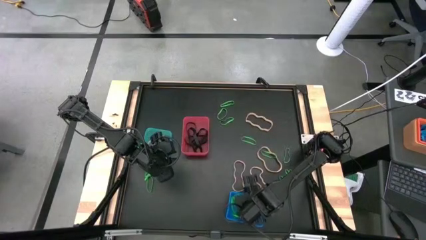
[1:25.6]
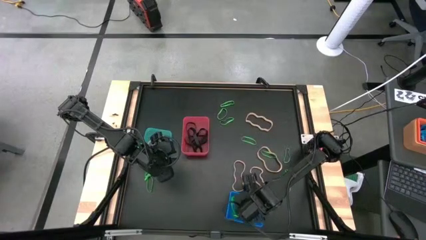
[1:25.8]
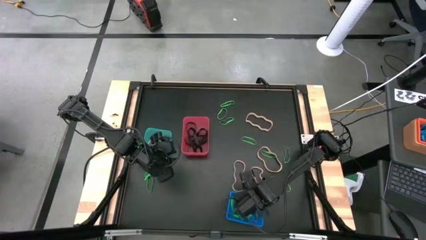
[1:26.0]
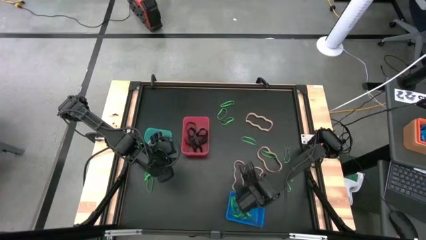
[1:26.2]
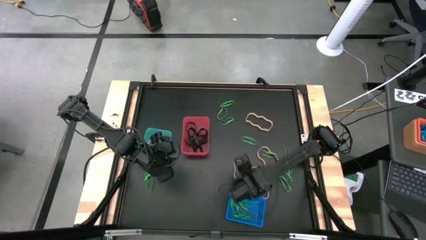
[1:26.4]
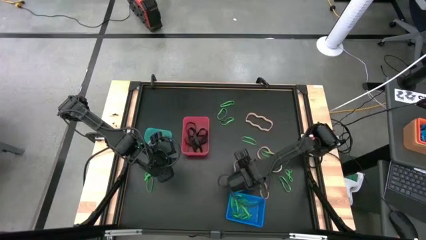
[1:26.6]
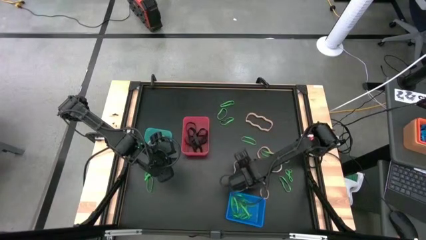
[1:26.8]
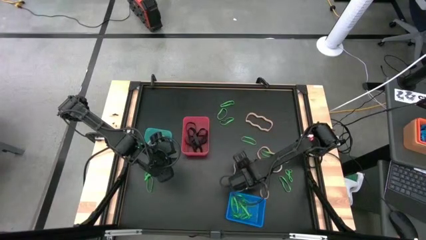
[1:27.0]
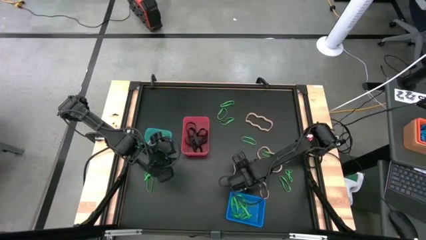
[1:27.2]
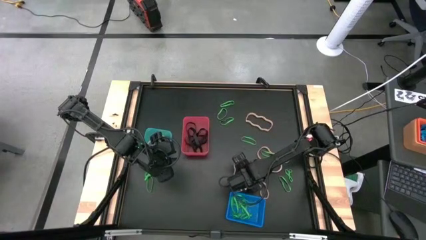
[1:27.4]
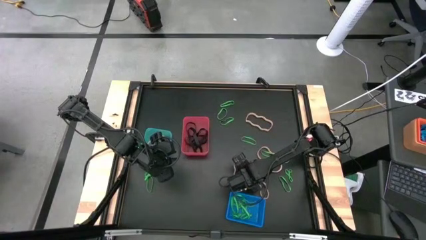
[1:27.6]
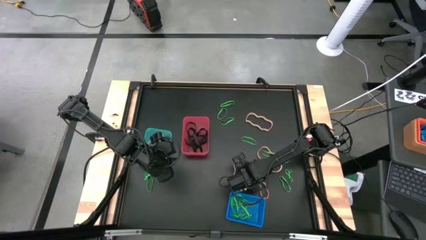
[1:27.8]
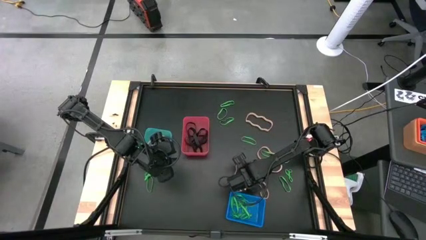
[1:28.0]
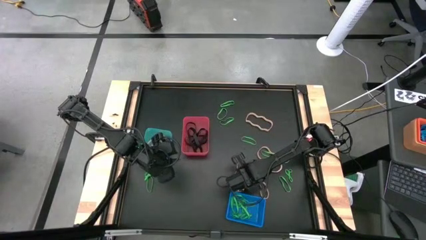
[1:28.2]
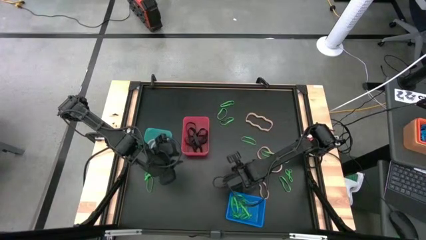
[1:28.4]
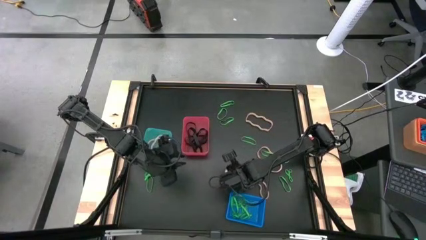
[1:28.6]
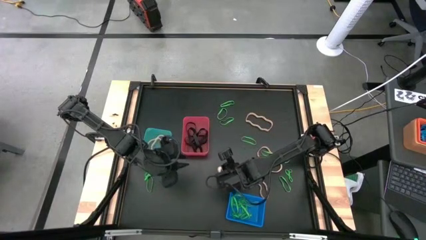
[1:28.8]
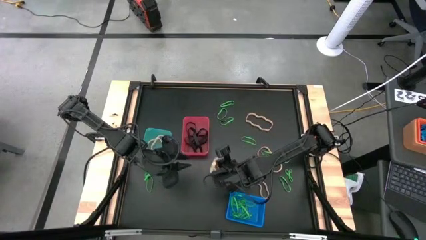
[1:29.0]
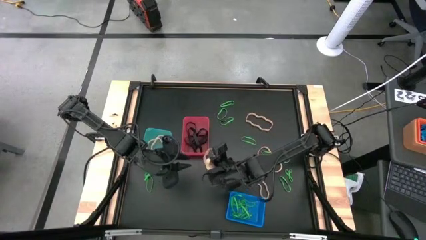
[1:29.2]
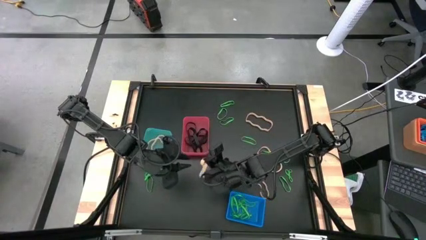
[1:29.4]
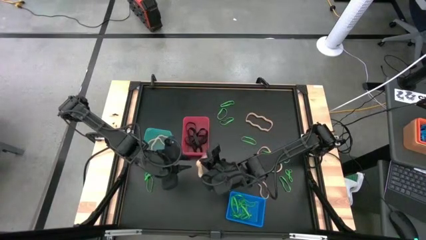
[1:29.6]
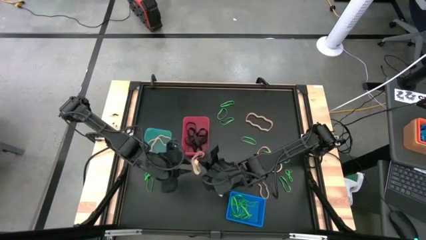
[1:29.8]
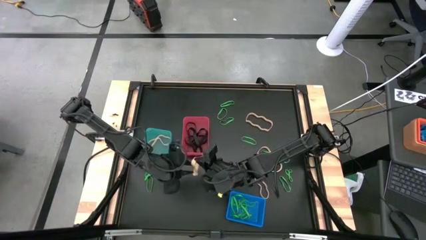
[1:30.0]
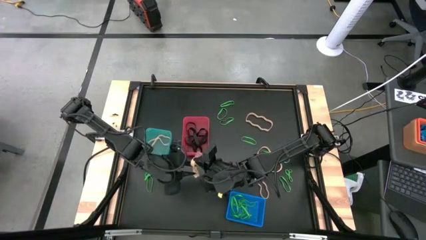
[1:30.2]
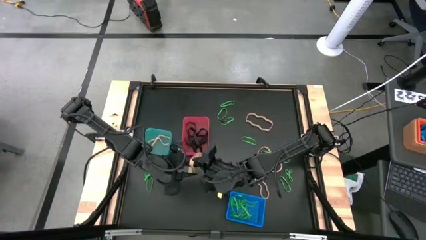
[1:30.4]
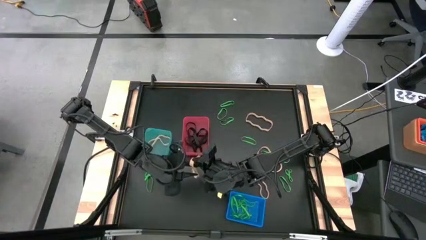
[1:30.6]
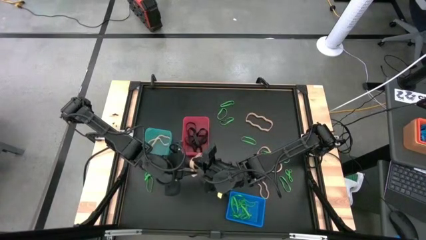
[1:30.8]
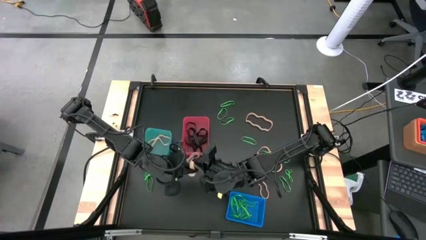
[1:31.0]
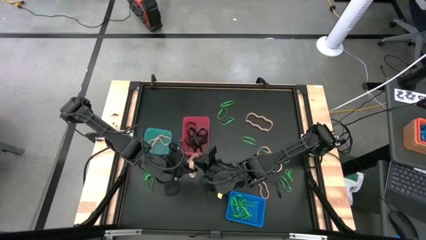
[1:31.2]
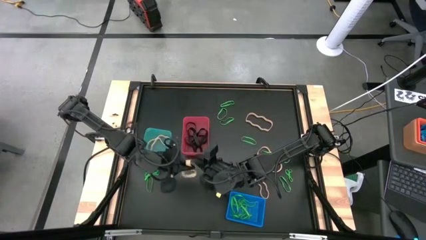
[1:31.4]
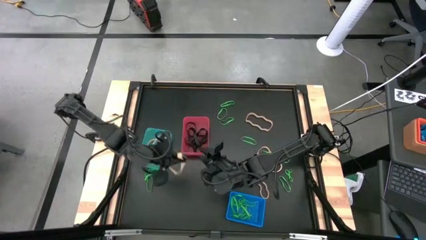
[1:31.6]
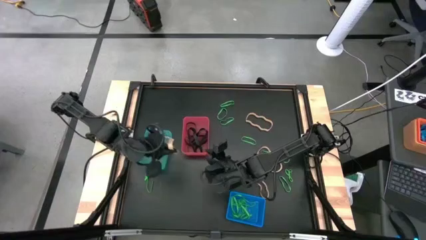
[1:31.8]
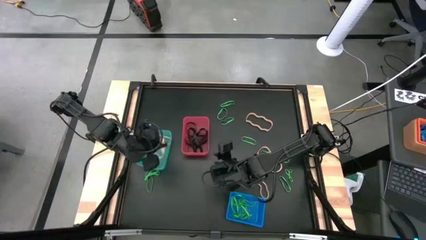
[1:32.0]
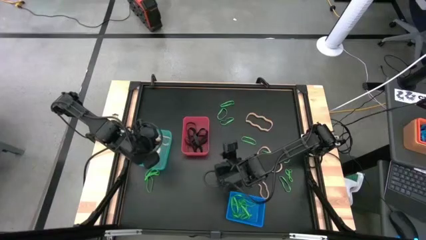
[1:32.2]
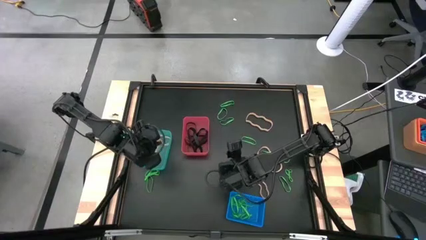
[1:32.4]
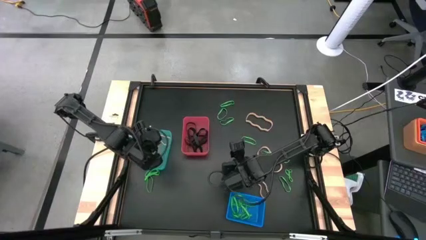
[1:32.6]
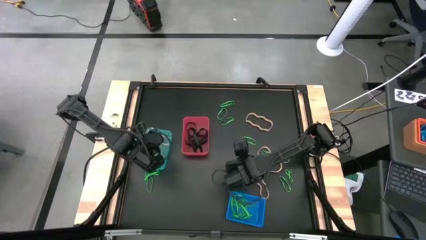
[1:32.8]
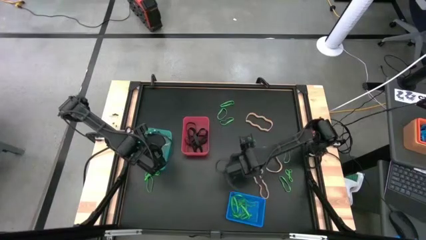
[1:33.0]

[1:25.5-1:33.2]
Task: Sort rubber bands into baskets
Put the light yellow rubber band into the light blue bin

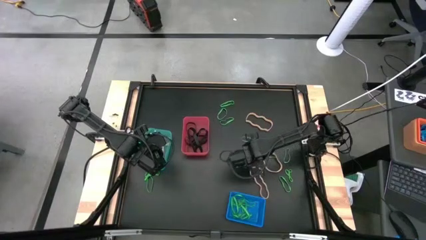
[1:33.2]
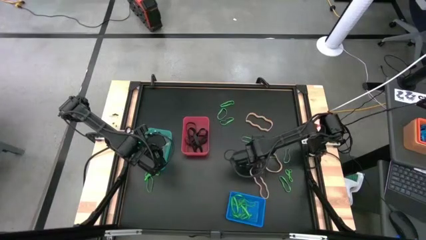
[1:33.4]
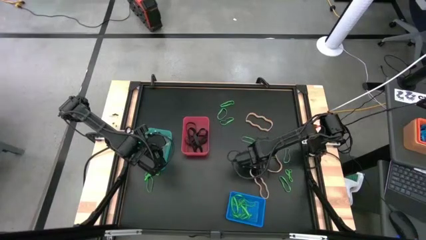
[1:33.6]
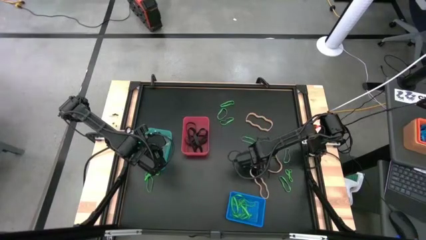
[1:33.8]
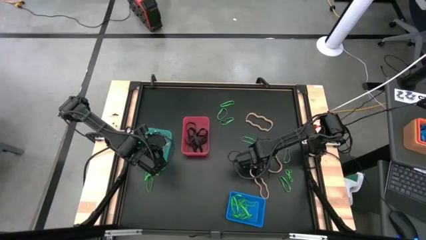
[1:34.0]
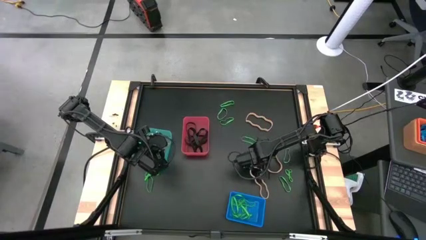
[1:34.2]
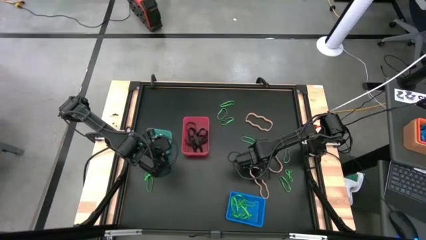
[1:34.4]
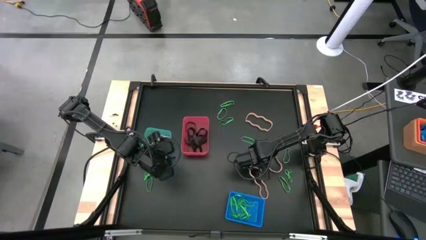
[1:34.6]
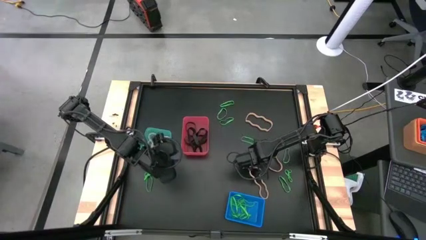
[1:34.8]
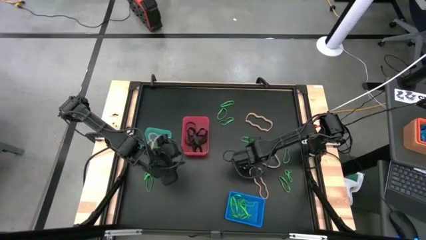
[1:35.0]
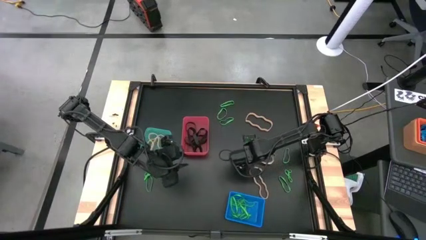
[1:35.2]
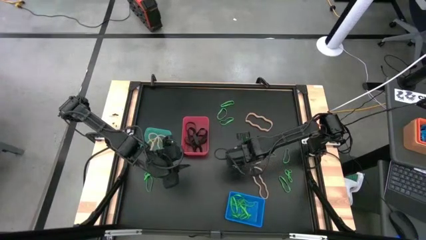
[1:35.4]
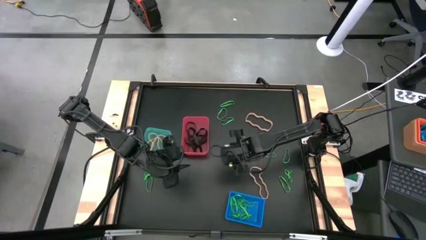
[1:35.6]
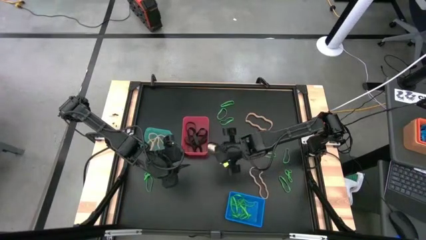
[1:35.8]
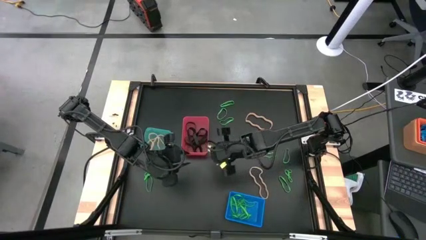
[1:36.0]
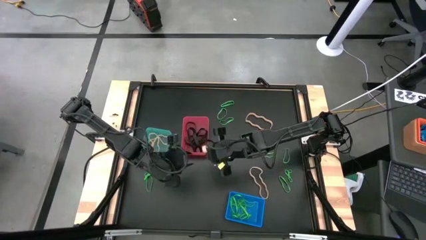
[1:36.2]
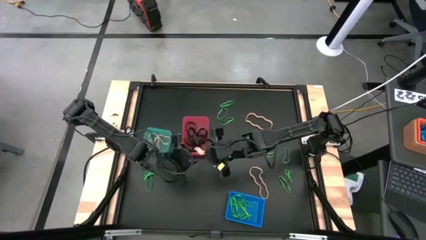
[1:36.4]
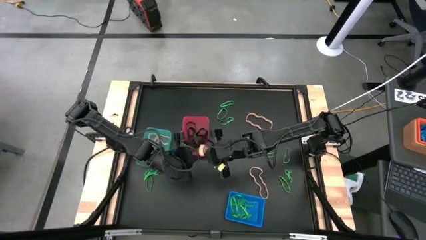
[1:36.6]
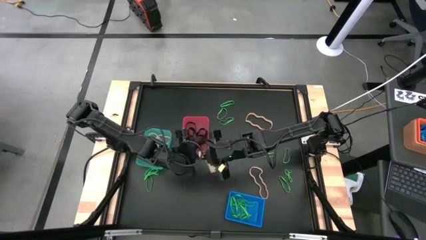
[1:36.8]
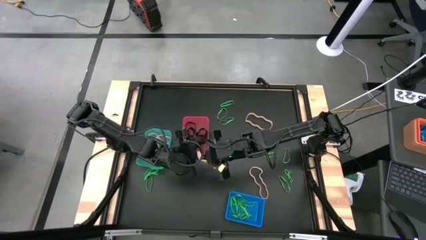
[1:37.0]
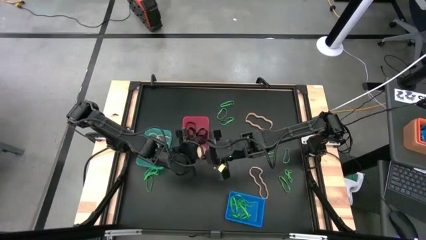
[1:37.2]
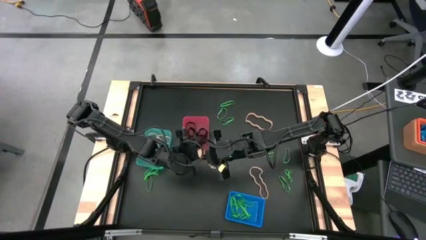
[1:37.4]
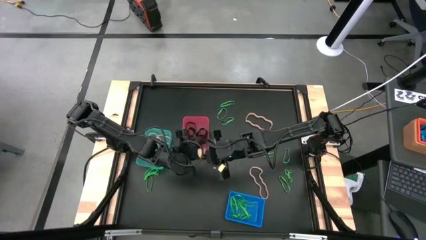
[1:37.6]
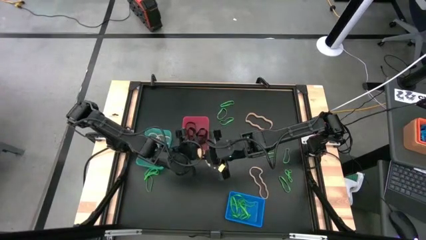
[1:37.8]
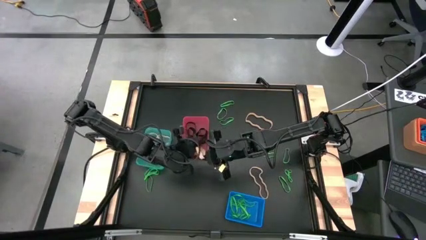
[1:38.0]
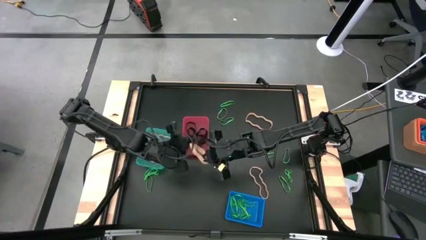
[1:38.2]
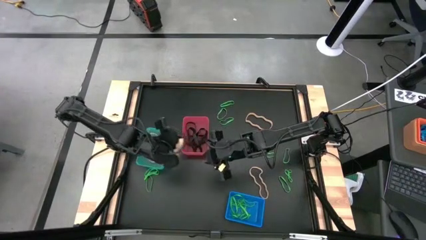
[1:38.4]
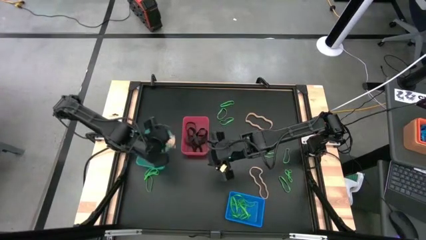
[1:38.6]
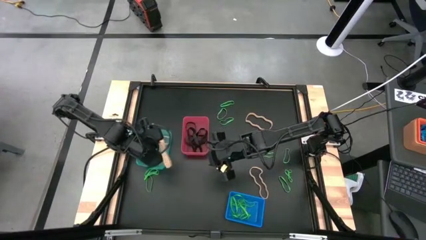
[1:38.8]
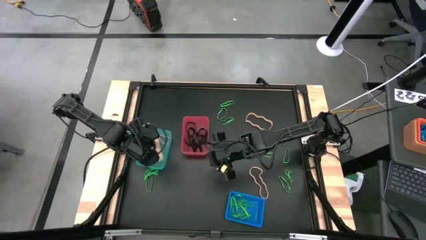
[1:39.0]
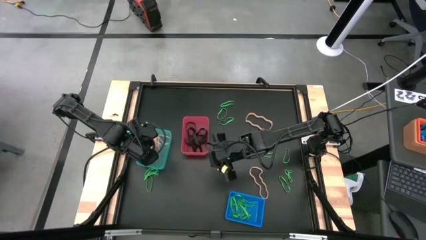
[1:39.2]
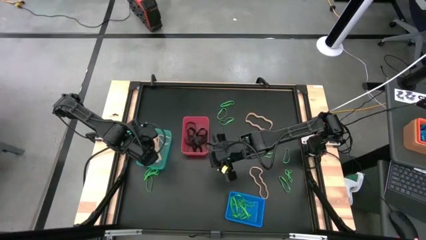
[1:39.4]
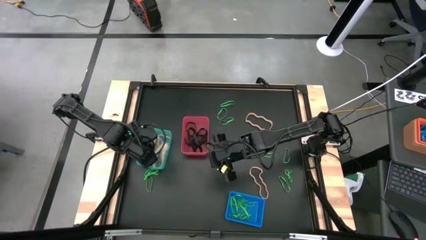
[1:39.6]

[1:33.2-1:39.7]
Put the light yellow rubber band into the light blue bin

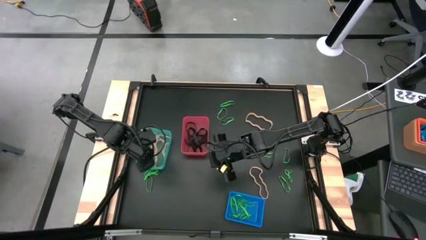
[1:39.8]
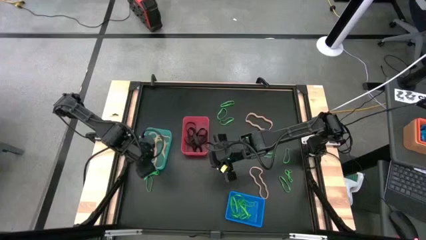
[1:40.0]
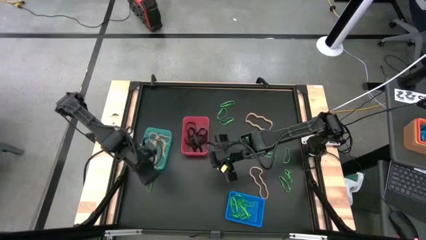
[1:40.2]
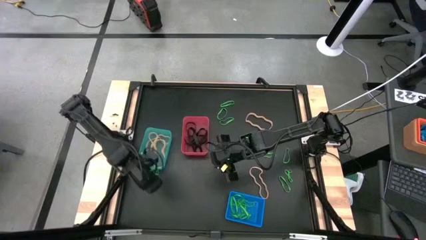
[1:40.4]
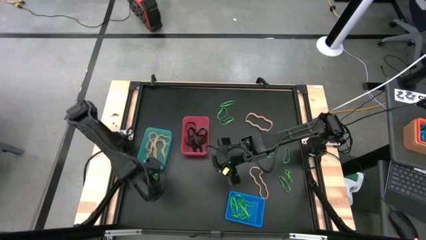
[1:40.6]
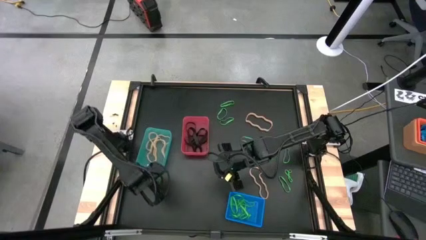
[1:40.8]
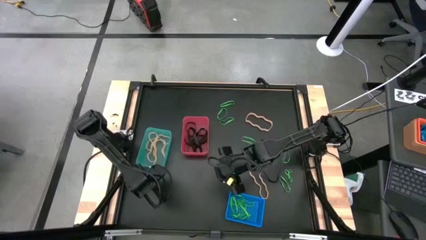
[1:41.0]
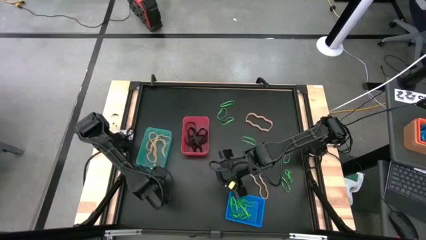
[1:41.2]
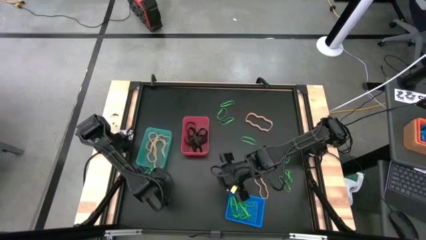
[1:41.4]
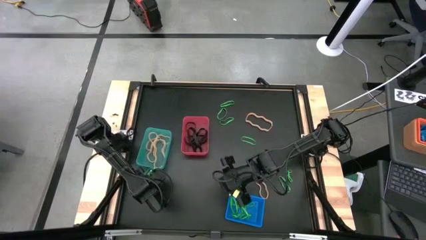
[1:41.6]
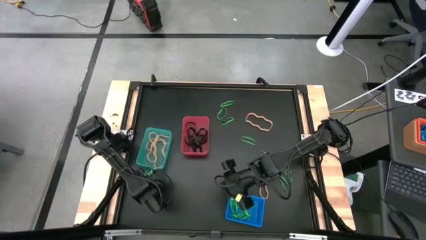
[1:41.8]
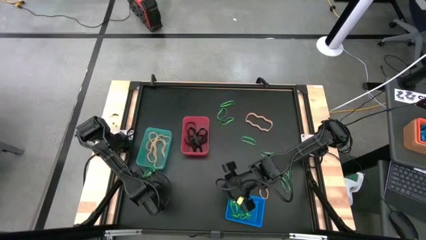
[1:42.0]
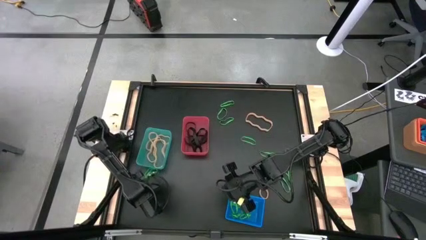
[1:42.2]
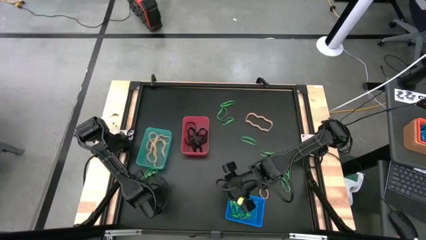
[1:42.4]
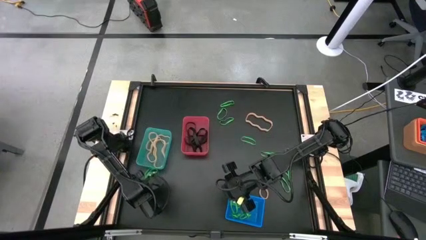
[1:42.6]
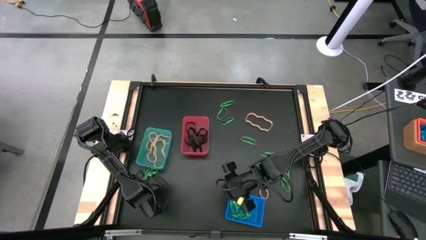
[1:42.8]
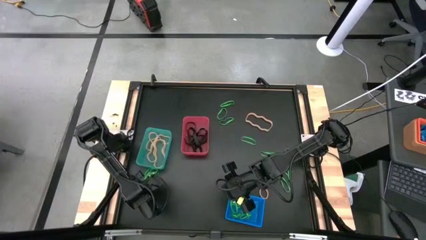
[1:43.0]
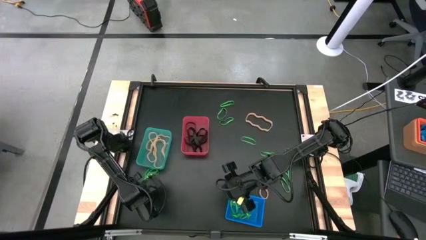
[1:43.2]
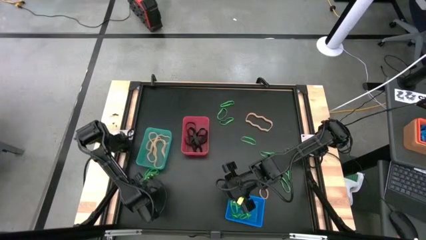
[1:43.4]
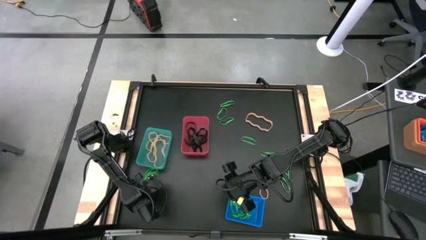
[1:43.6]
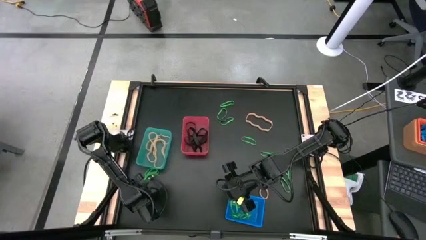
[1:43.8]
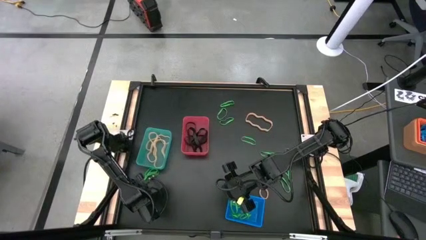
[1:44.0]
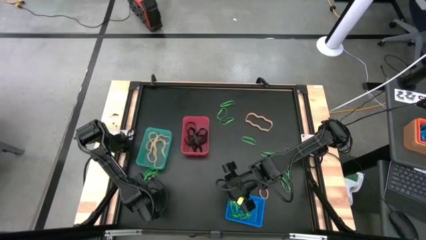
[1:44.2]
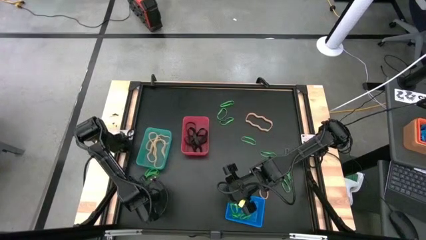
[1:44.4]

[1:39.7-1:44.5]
Put the green rubber band into the blue bin
